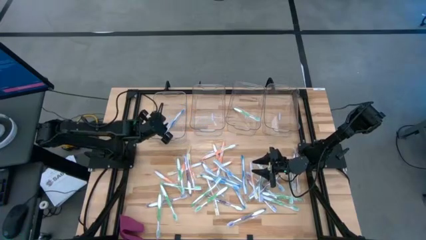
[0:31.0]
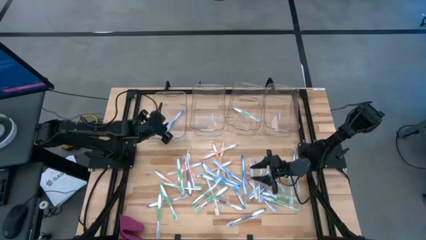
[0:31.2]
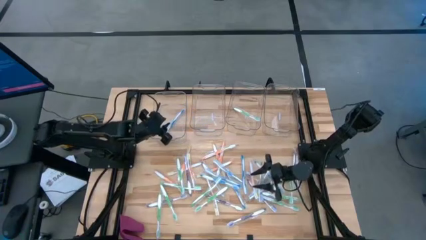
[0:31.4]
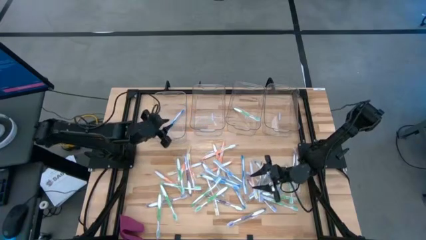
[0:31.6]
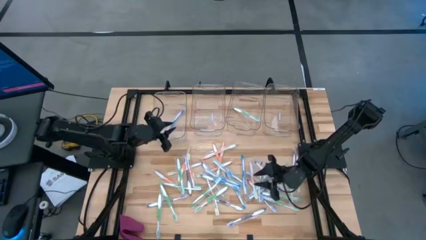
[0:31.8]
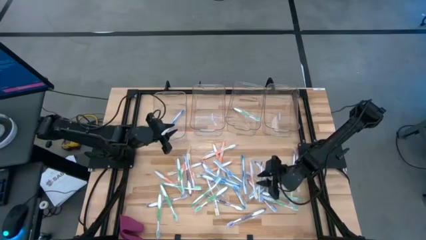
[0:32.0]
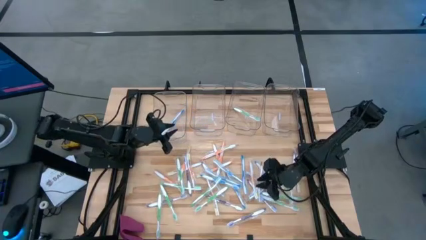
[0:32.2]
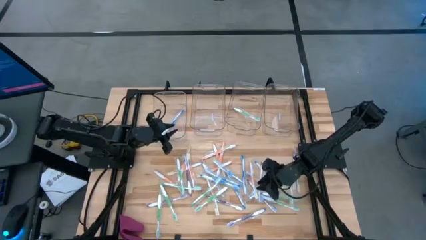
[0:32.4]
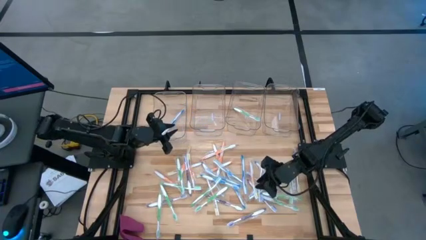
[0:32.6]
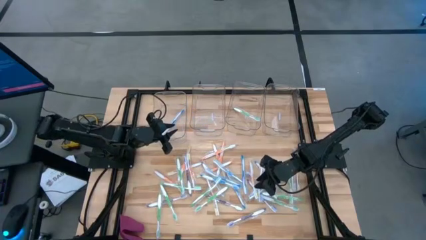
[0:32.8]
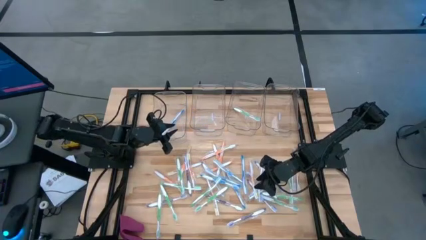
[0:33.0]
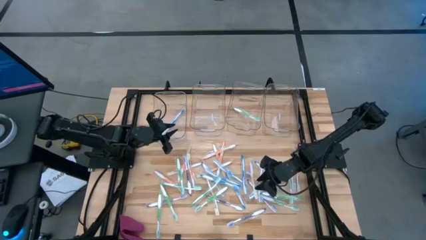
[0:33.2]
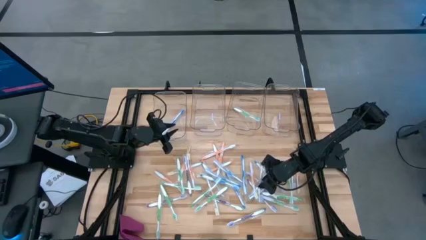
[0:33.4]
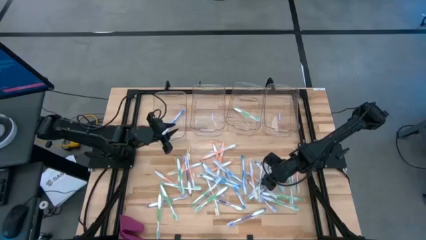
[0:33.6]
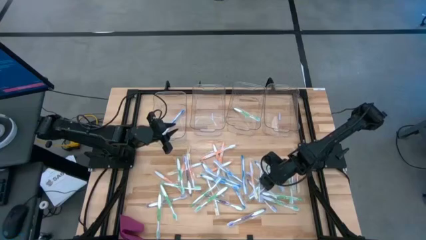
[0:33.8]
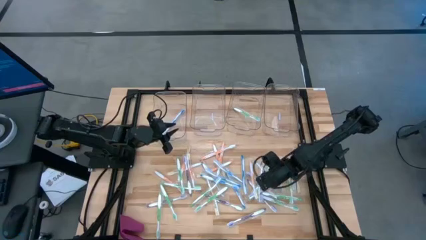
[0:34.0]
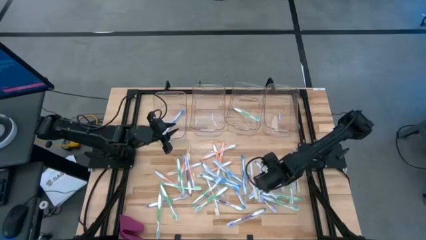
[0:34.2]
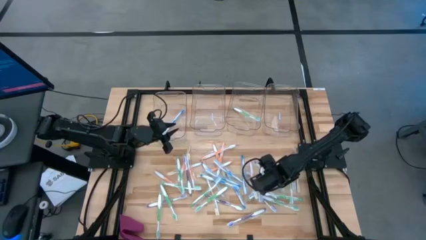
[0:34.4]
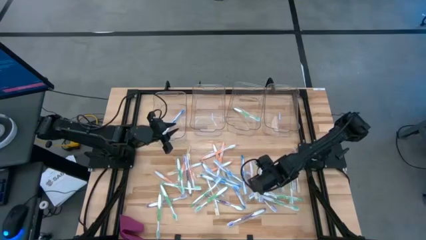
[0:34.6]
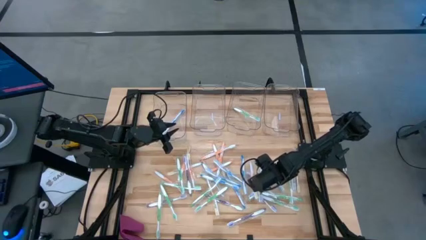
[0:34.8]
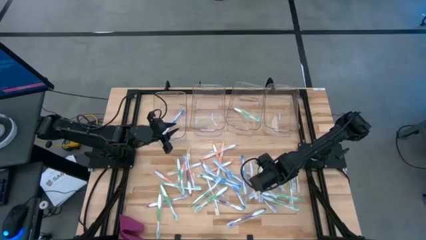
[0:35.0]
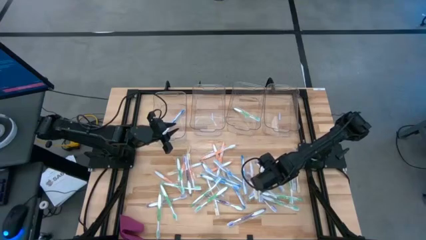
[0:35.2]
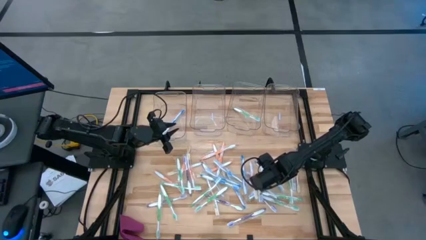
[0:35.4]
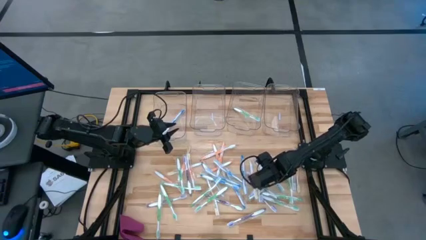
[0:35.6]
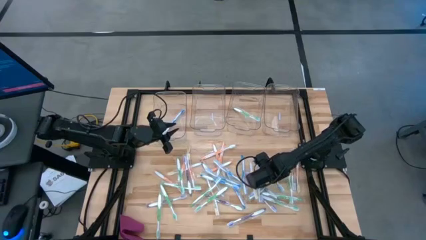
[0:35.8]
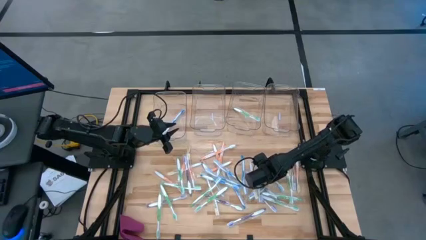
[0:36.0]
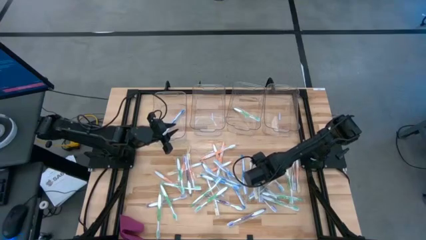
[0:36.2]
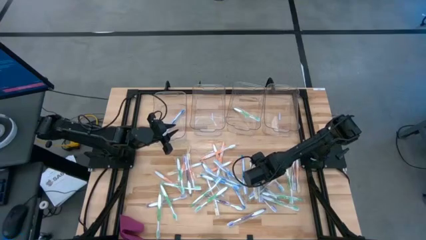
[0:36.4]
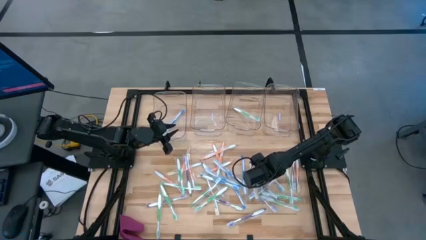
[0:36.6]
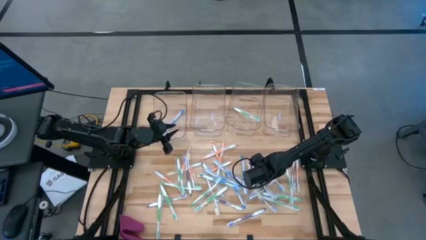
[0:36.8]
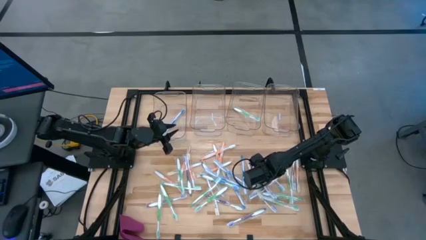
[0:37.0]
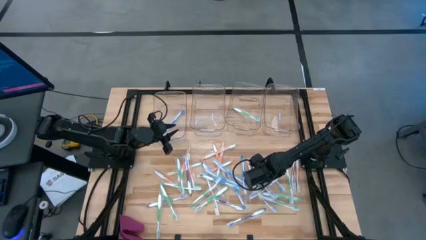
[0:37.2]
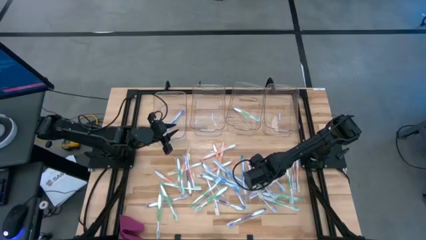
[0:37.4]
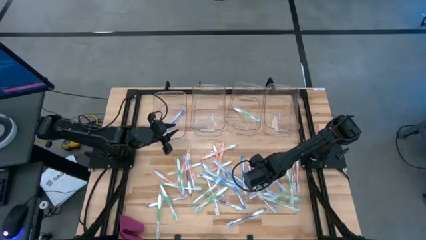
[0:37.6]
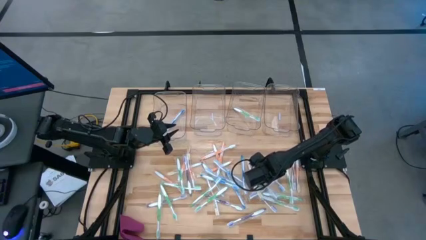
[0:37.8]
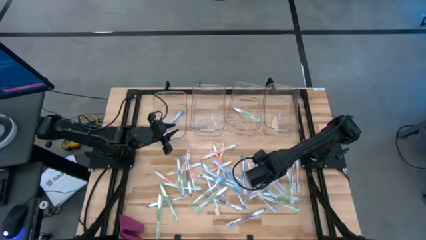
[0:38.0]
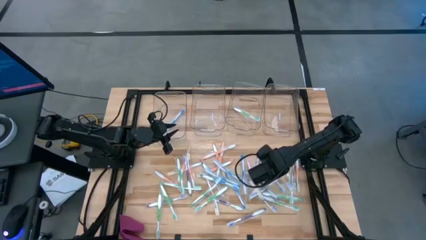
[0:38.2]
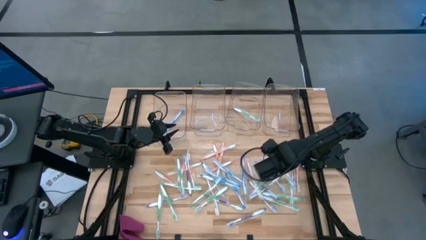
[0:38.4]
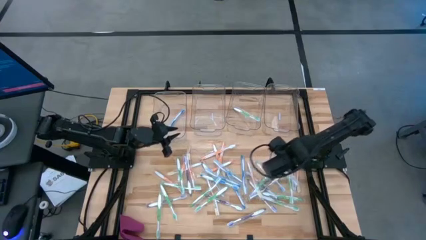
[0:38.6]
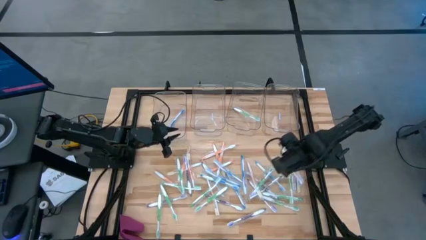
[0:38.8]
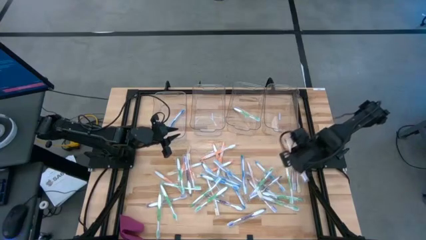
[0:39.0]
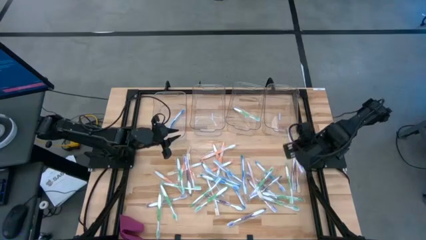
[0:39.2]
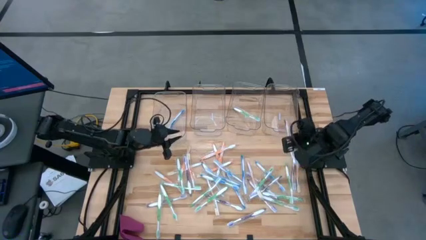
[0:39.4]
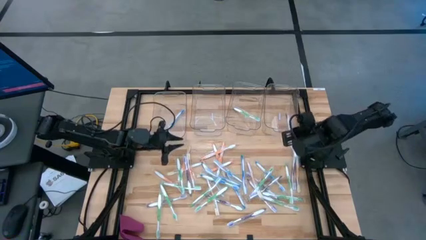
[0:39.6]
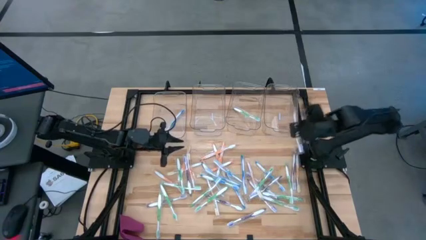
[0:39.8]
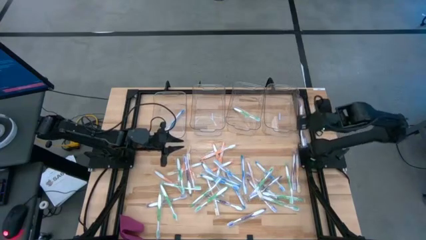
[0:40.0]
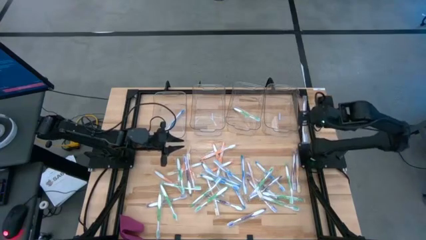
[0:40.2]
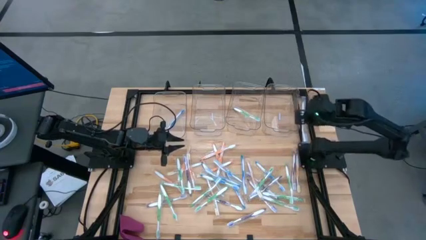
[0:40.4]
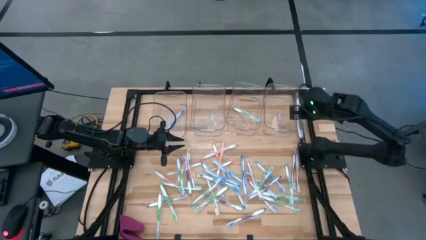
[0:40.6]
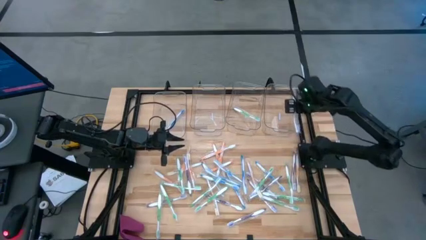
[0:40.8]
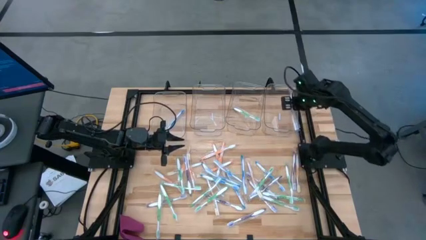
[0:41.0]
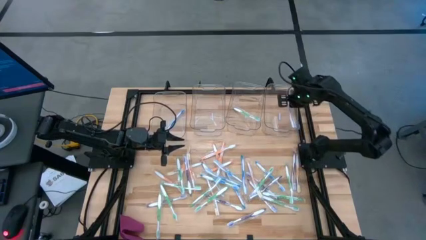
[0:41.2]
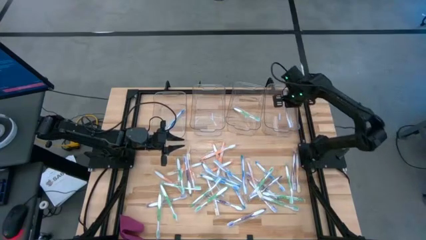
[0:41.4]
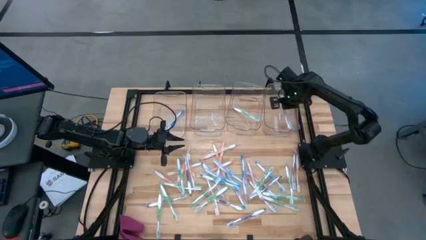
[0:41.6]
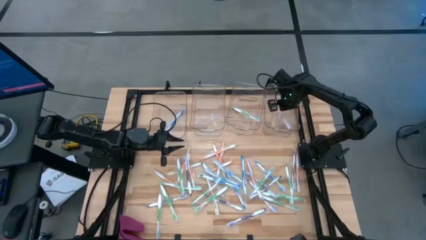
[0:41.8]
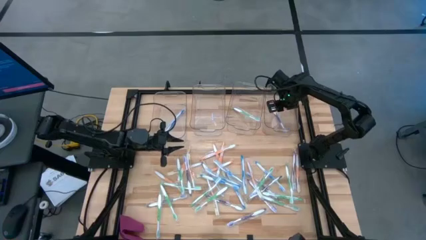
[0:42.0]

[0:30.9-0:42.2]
Task: Pick & Place Toothbrushes
Put the violet toothbrush into the right transparent bin

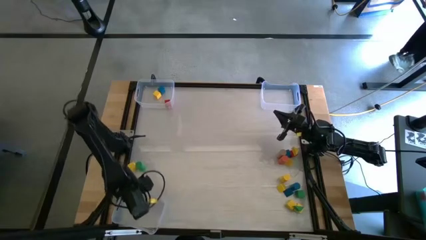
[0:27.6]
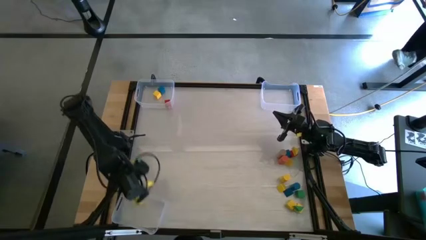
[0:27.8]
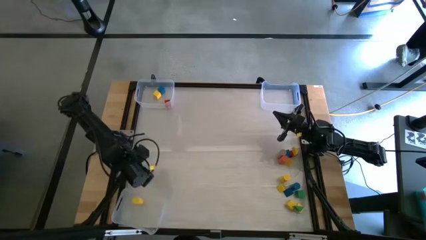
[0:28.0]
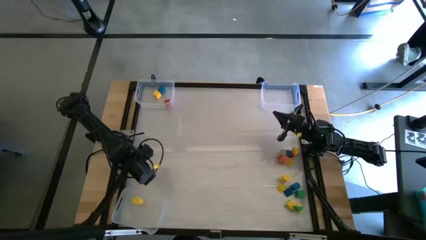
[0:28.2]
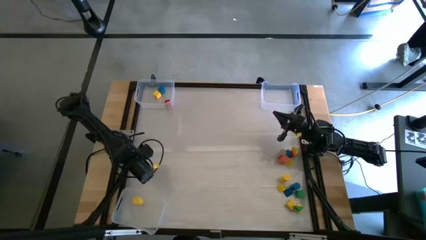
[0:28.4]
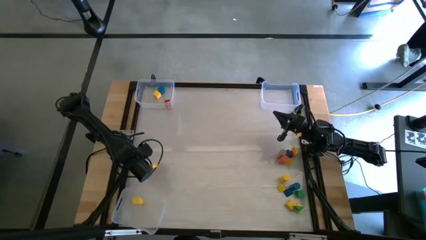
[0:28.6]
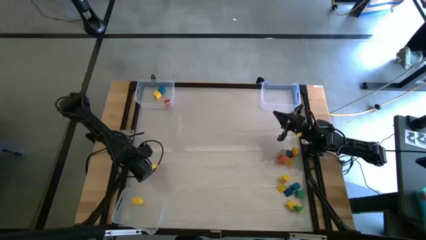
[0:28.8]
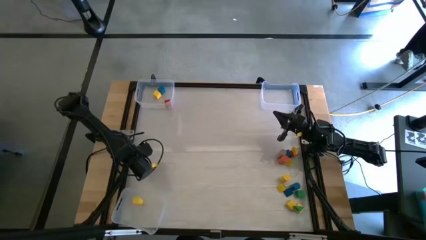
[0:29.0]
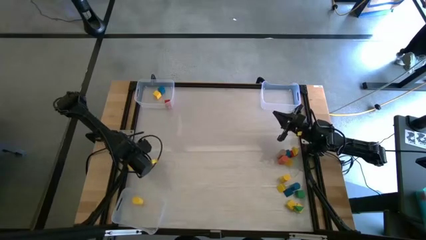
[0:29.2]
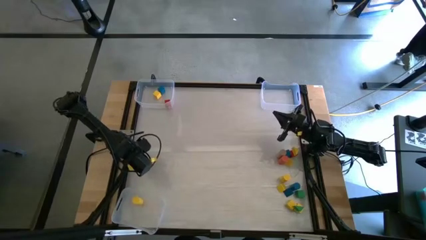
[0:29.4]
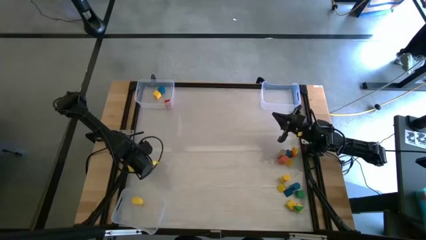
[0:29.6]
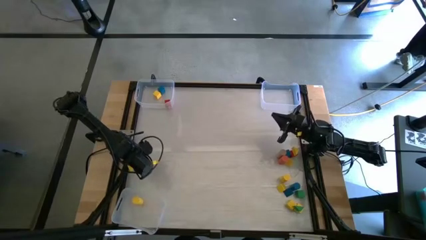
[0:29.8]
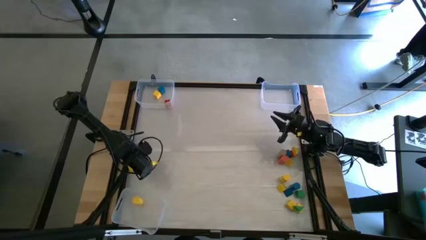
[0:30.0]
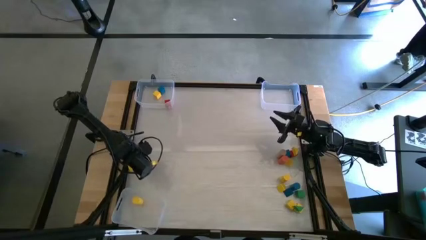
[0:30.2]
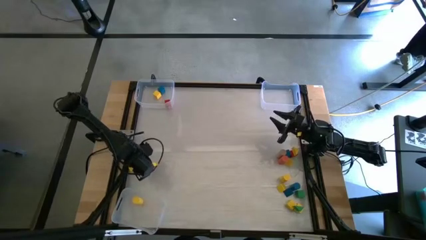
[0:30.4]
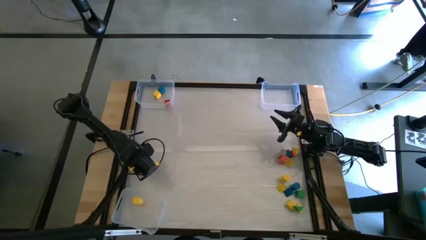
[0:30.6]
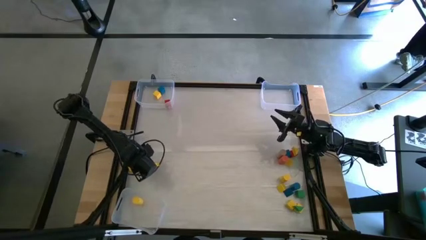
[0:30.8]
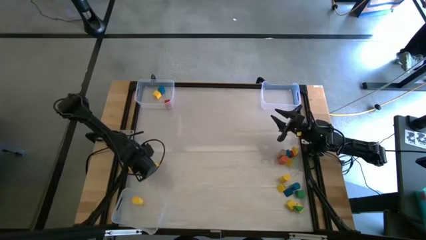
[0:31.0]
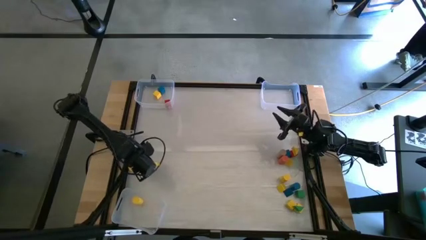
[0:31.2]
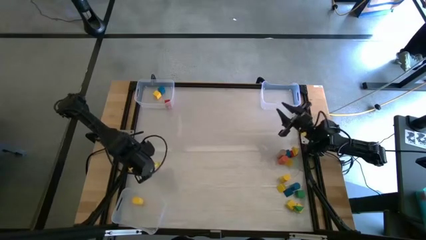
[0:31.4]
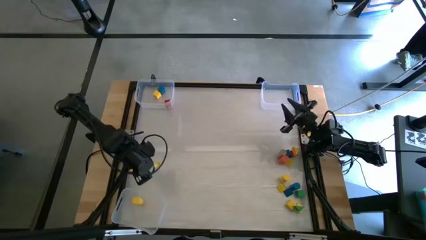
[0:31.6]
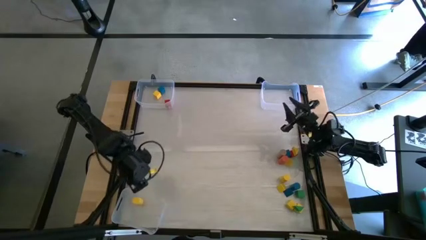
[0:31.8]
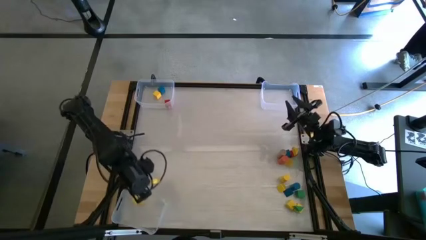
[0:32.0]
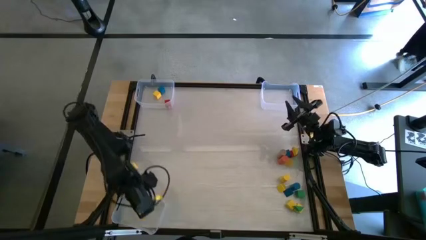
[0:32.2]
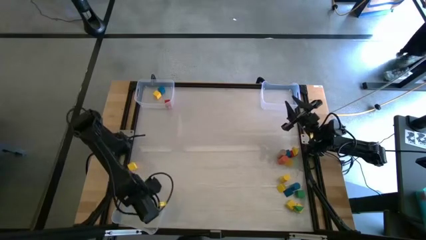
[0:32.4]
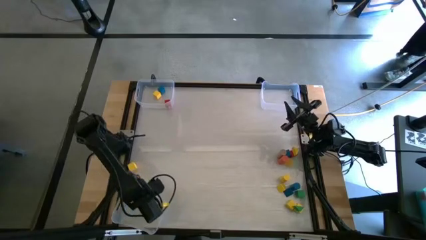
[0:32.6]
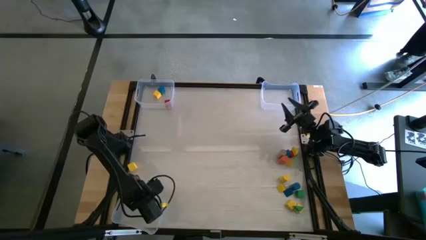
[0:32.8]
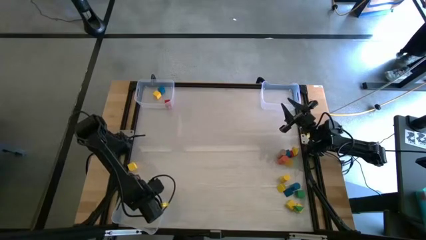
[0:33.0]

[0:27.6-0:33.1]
Task: Sort blocks by size
Put the left green cylinder block into the bottom transparent bin
